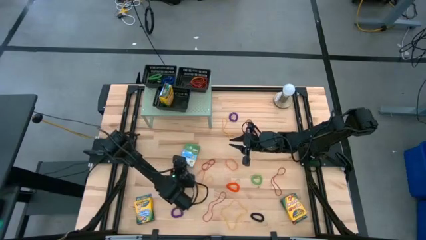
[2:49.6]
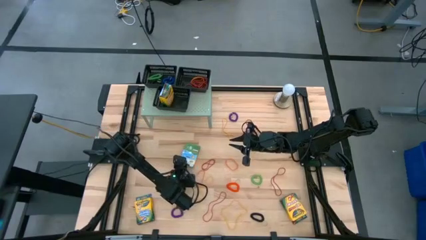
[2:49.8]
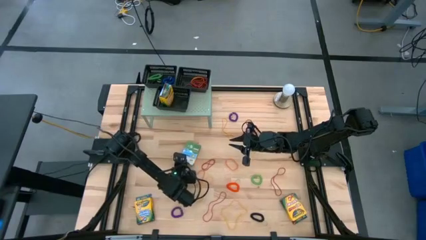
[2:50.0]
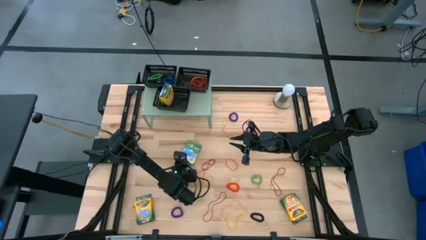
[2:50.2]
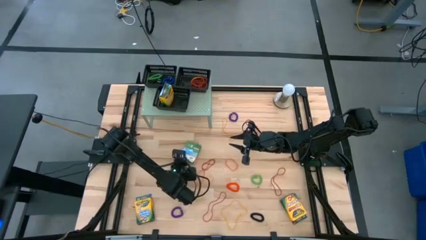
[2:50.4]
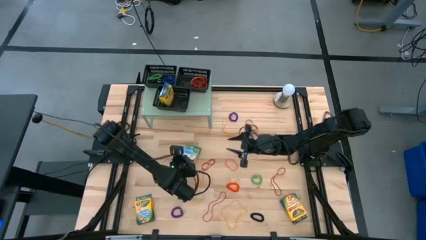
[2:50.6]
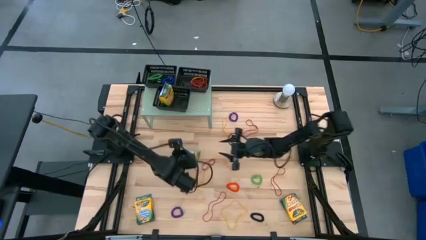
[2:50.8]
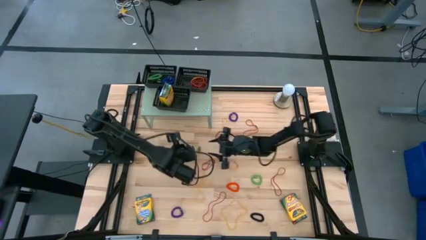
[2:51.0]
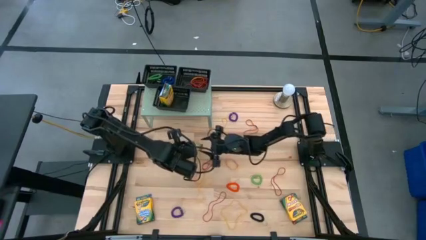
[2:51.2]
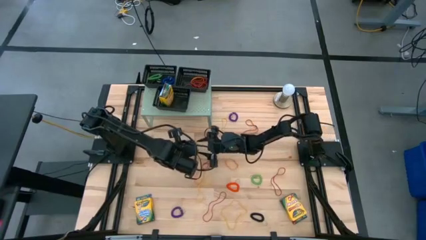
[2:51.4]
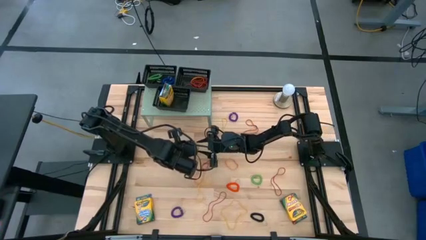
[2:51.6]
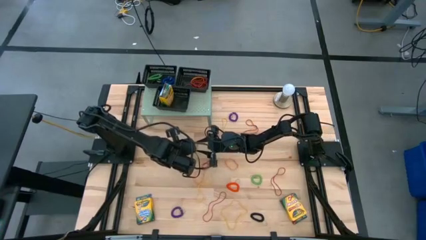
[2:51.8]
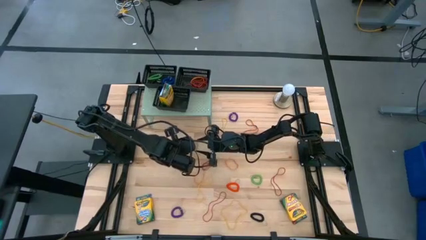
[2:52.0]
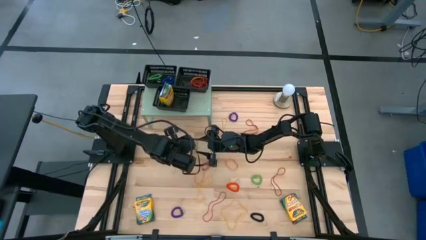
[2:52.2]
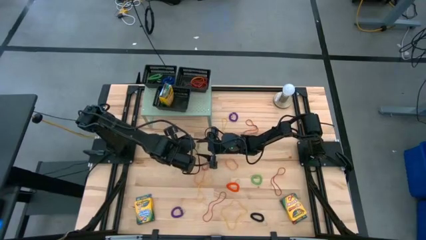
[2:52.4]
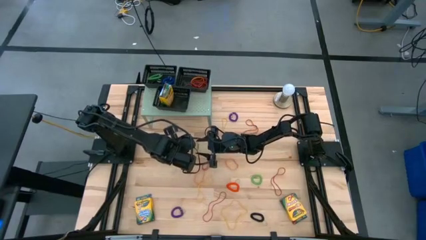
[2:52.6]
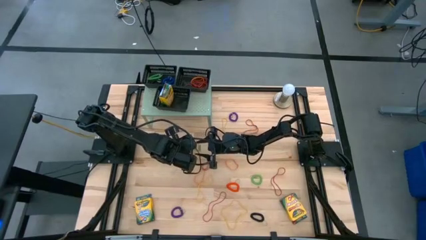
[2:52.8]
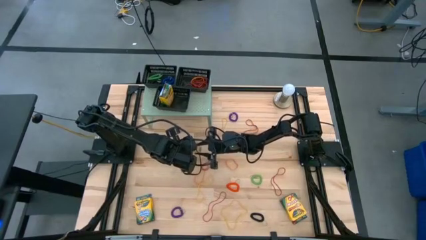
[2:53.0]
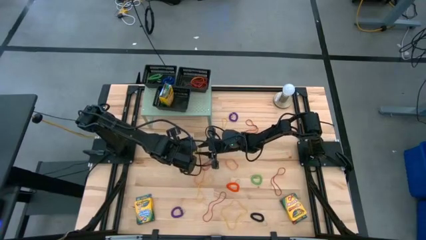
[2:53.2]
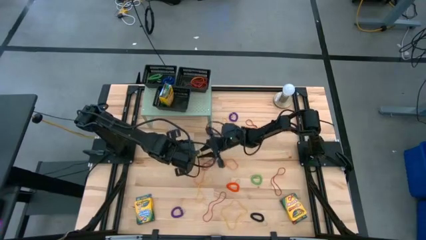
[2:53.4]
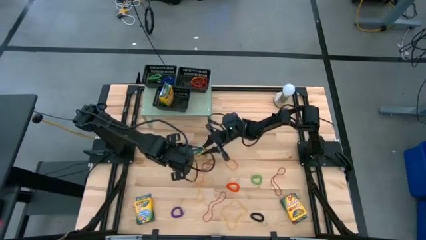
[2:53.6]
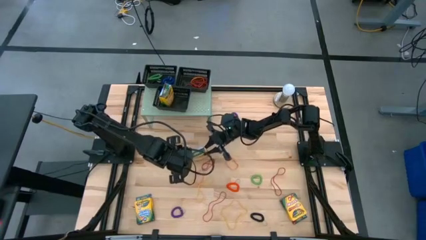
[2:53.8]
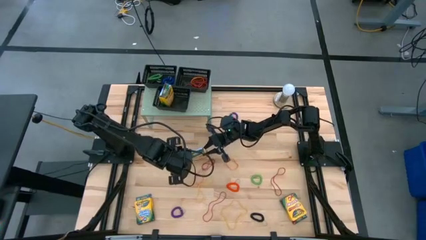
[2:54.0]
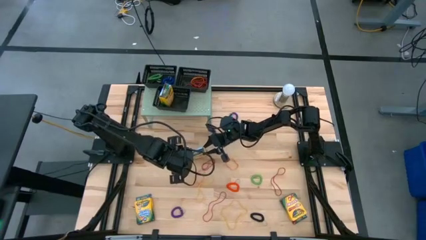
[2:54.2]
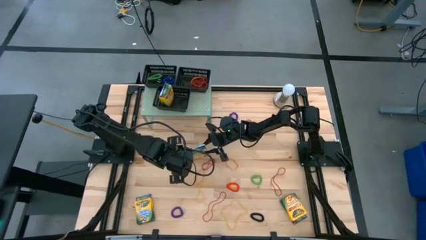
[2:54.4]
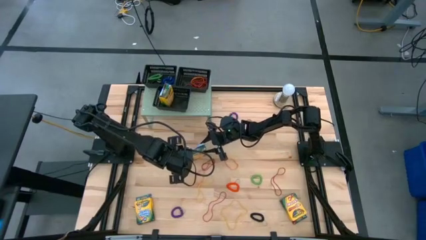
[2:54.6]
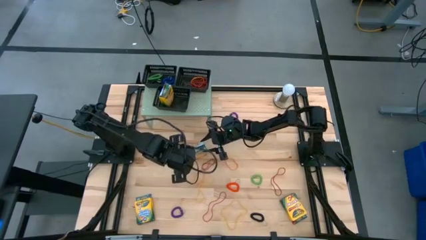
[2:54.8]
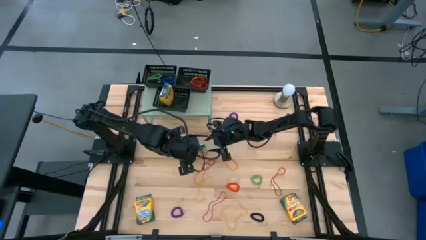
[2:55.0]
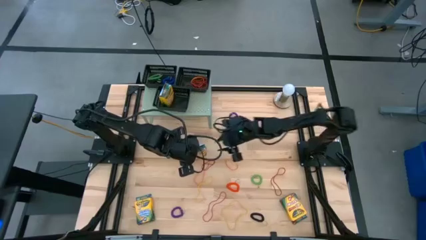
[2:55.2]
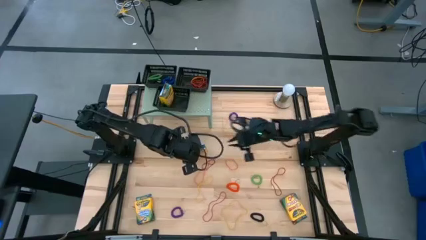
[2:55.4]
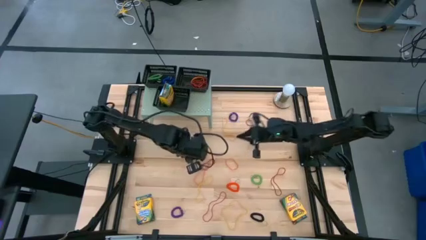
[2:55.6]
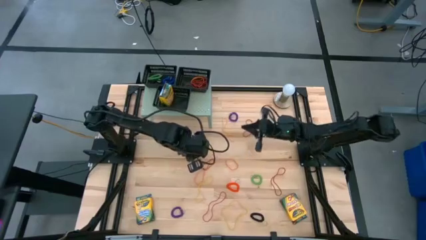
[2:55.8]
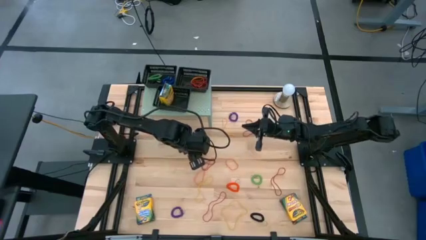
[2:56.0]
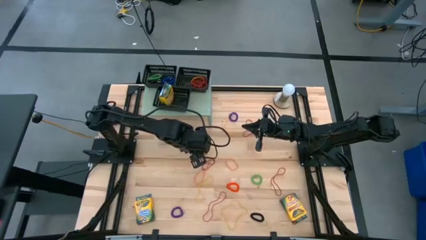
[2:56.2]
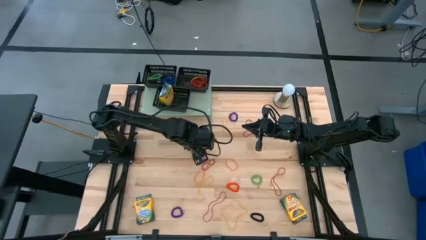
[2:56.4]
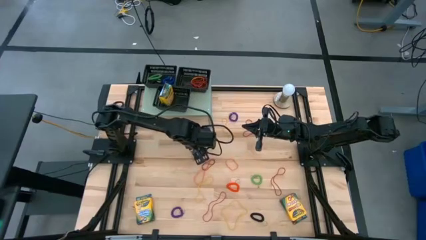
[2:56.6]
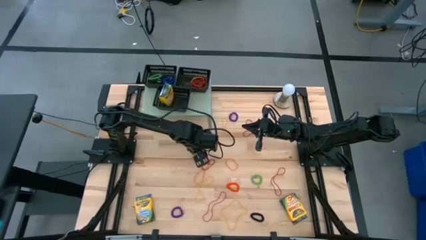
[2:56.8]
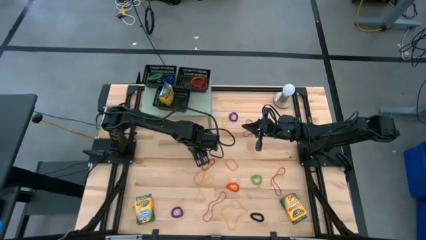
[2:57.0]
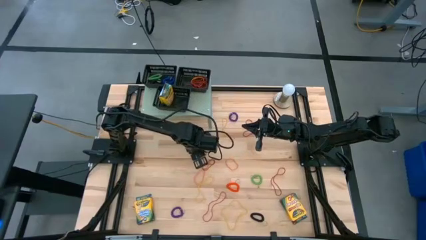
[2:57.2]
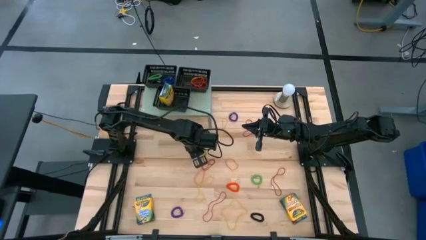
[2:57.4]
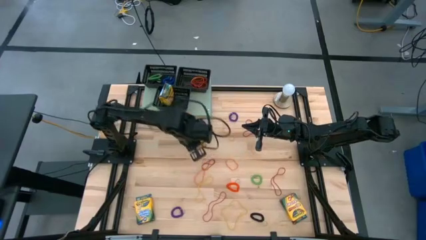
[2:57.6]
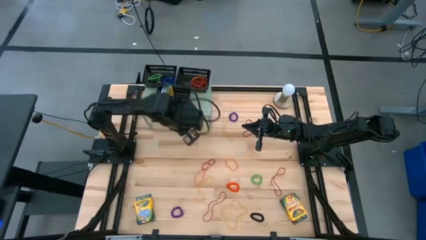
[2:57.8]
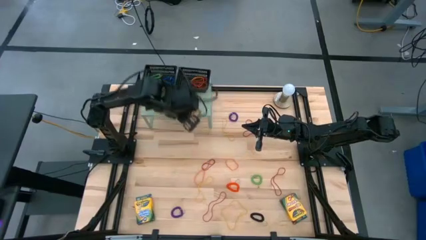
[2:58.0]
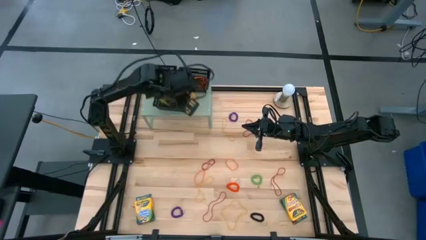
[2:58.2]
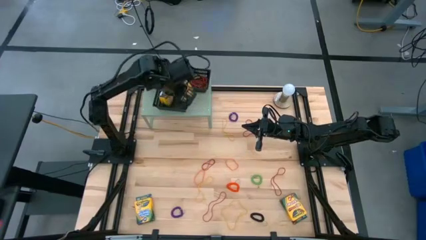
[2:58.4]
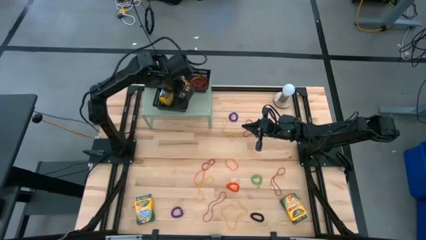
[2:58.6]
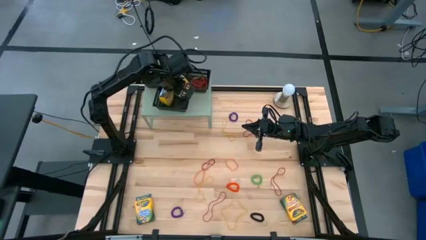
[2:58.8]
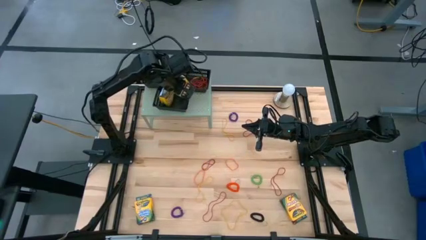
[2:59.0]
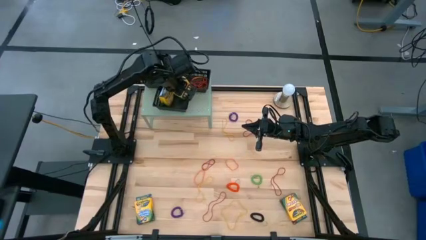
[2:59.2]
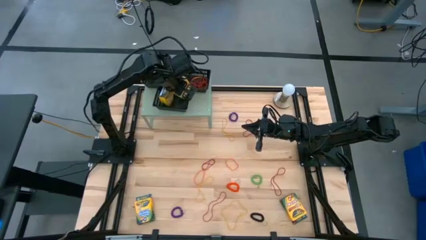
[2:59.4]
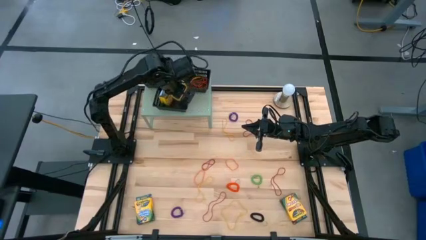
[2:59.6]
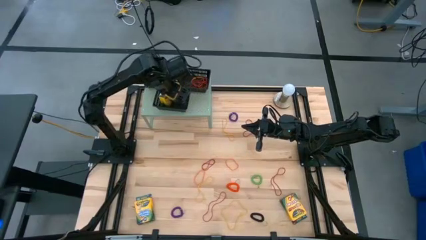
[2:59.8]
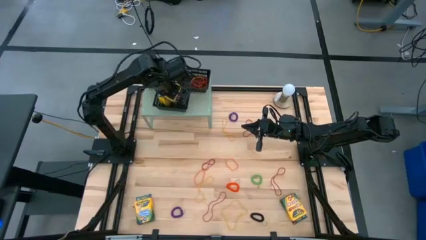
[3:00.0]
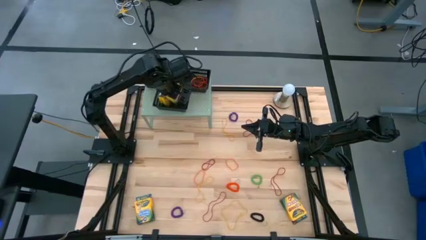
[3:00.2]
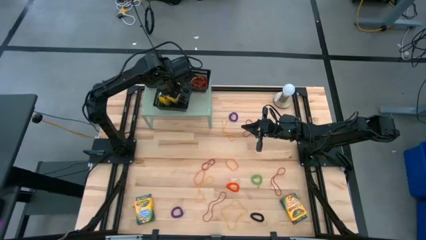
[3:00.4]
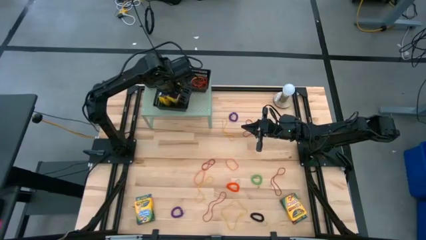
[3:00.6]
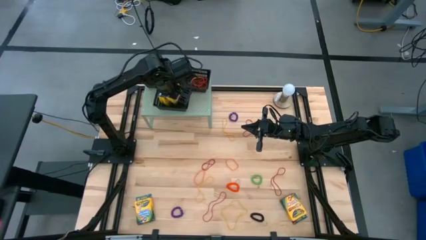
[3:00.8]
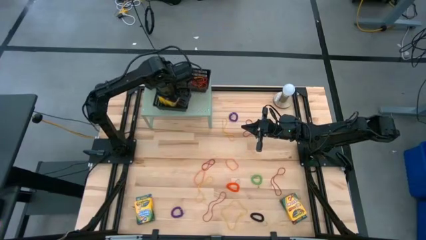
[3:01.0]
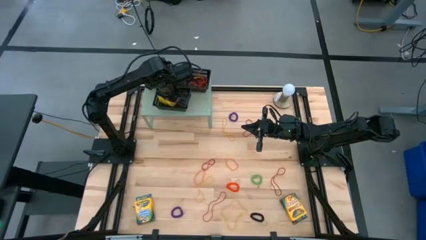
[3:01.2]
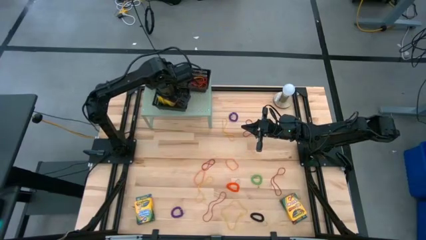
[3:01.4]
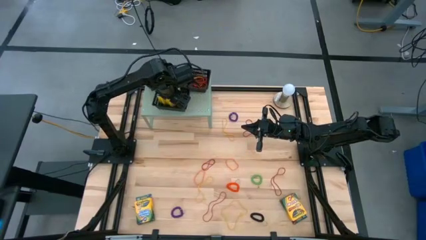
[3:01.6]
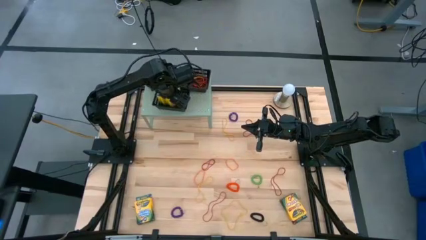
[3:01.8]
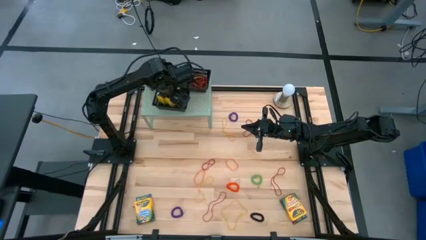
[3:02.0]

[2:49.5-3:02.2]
Task: Pick & Place Office Desk Supplies
Put the yellow crayon box into the bottom black bin

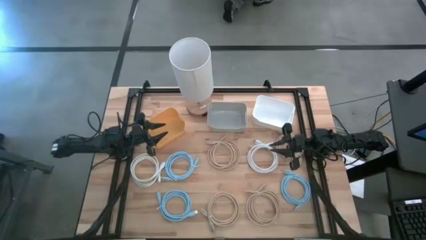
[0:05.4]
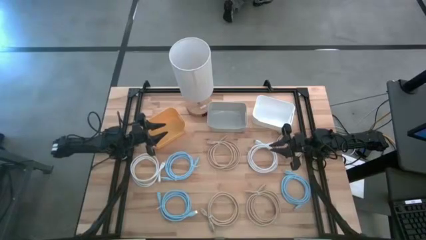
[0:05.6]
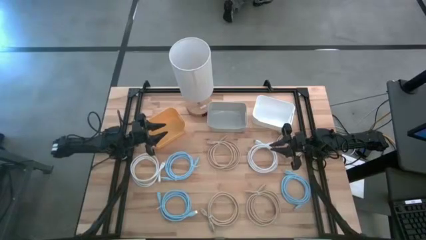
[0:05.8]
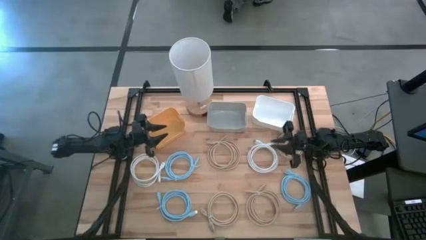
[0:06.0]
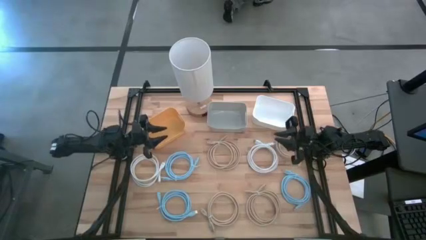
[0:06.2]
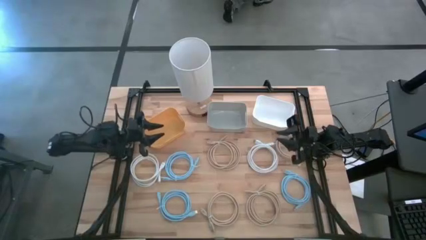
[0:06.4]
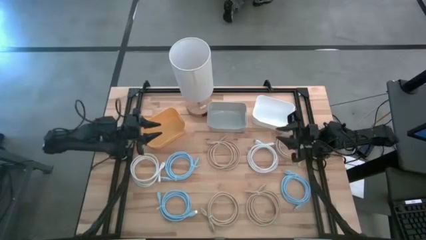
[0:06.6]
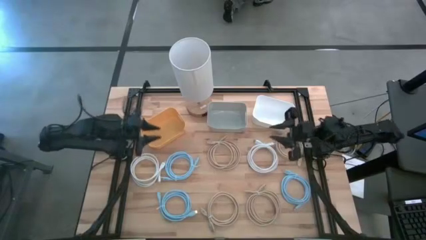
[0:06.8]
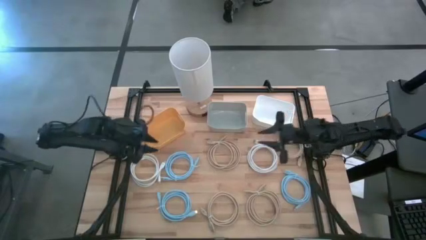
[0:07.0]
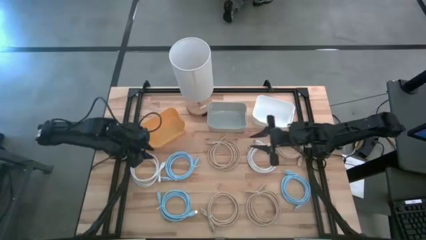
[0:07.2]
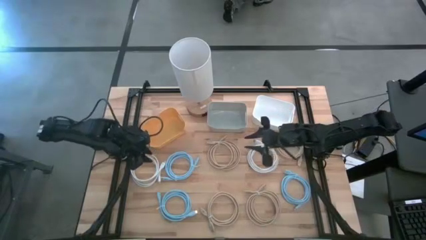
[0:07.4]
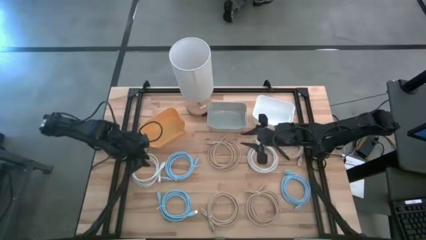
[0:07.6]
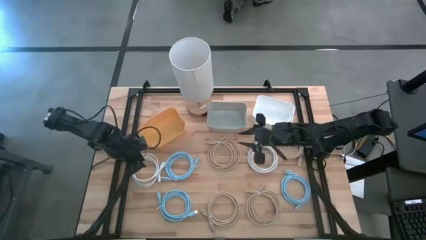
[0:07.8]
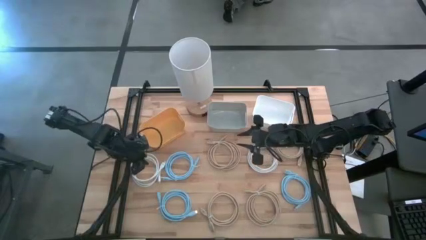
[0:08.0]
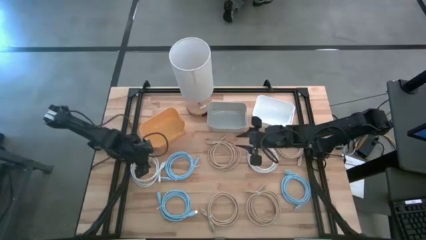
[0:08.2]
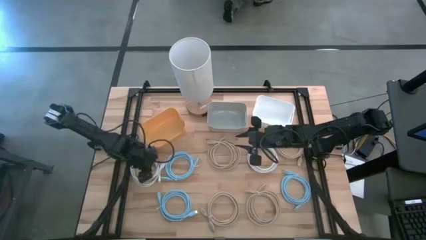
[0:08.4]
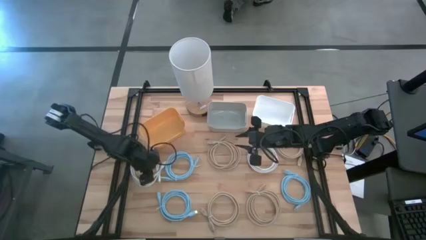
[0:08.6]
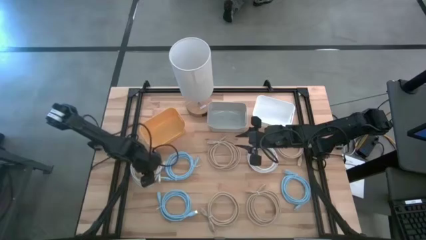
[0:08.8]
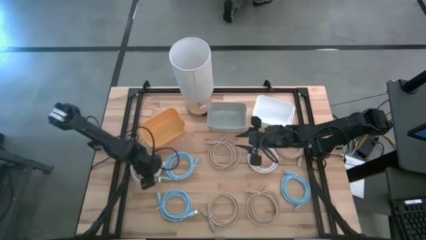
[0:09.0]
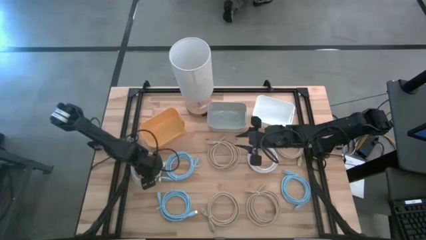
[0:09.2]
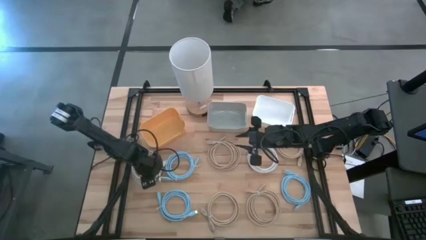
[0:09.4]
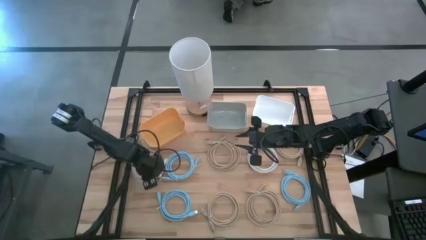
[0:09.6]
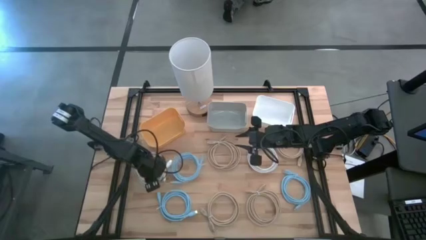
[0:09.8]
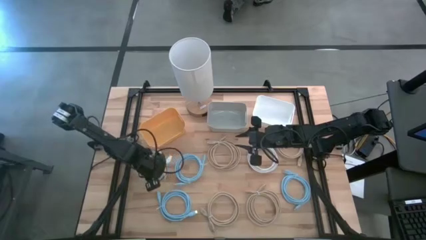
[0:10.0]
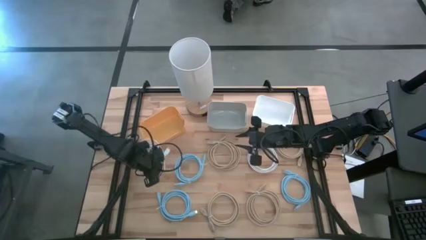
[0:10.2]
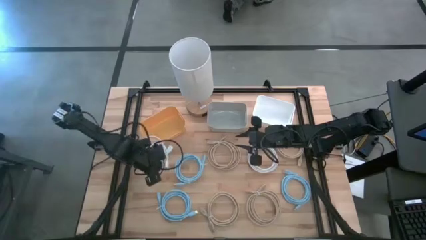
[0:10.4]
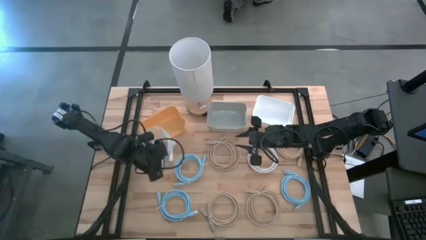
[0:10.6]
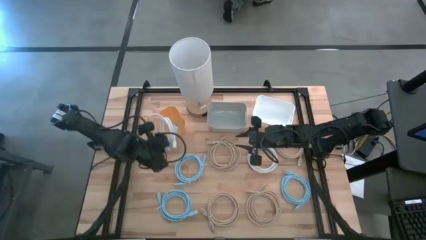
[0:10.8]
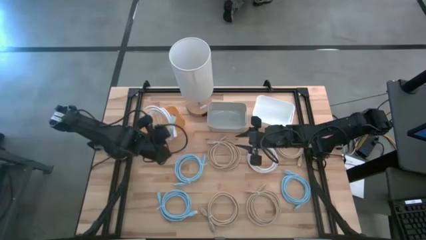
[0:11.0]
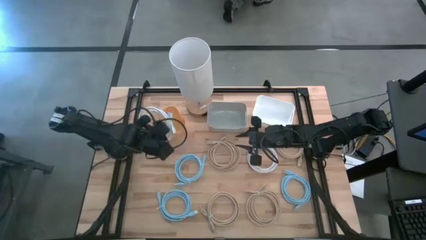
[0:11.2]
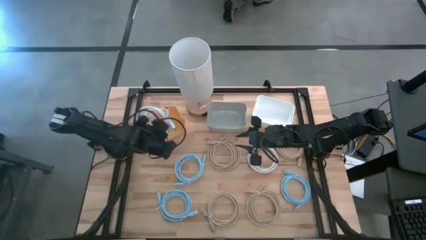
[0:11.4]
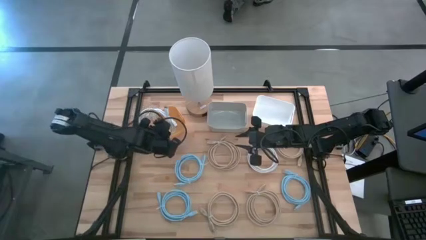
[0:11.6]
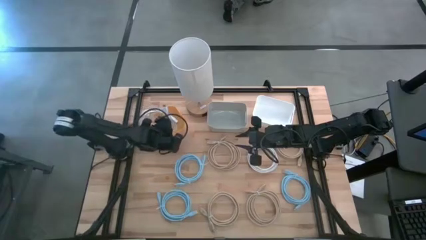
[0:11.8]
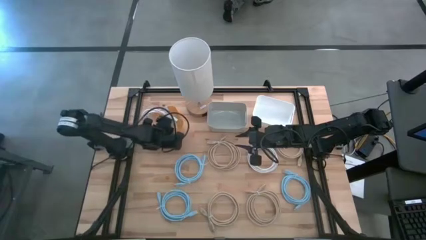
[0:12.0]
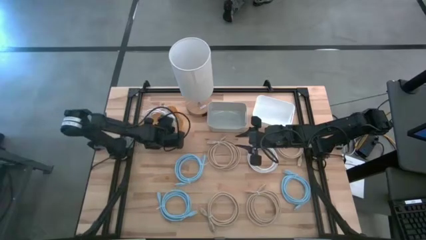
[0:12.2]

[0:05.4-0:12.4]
Task: Sort HDMI cables
Put the left white HDMI cable into the yellow bin
